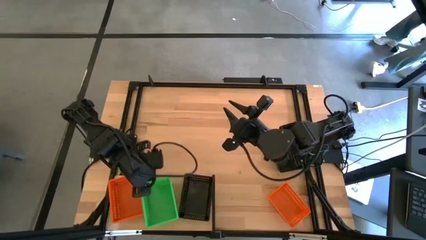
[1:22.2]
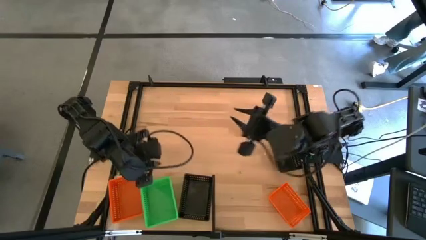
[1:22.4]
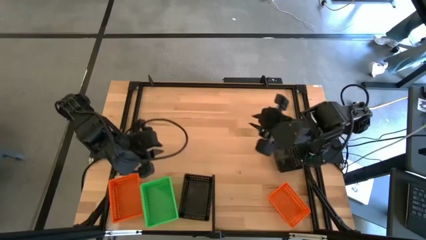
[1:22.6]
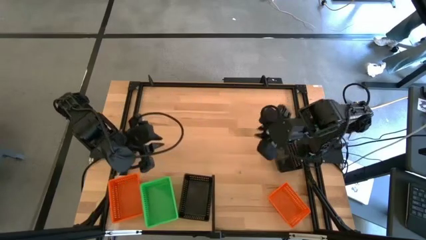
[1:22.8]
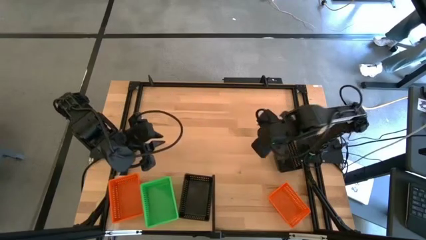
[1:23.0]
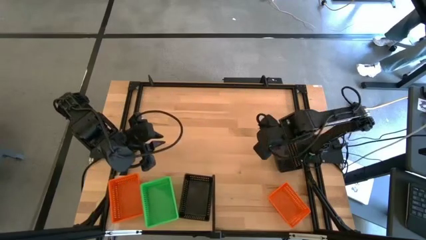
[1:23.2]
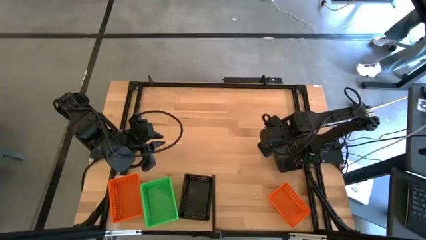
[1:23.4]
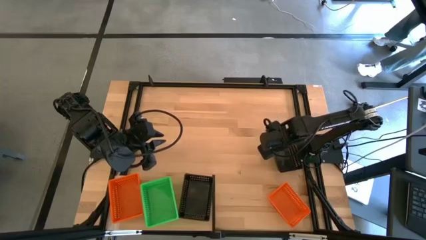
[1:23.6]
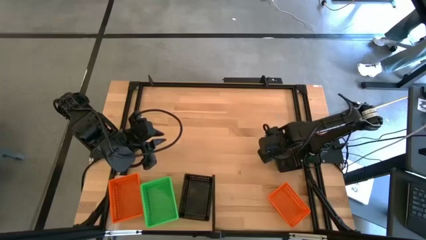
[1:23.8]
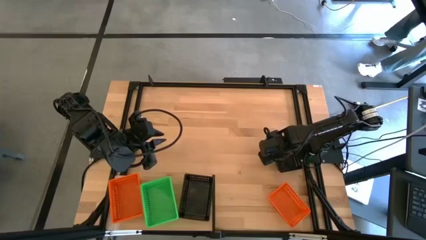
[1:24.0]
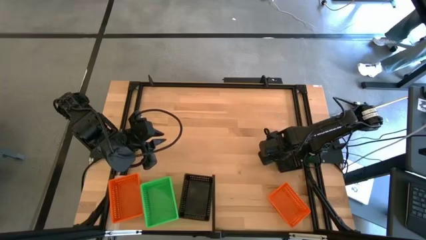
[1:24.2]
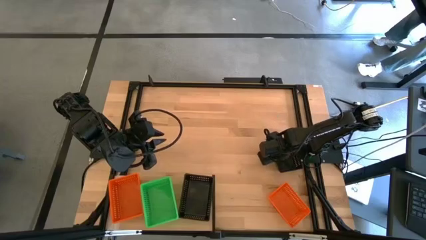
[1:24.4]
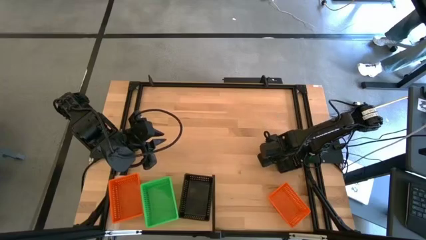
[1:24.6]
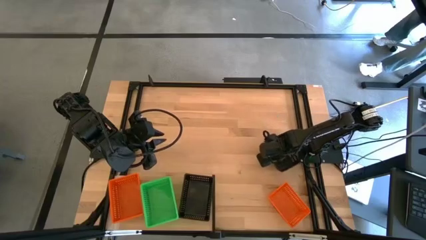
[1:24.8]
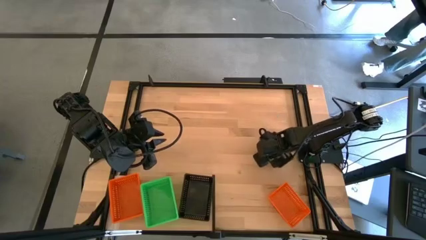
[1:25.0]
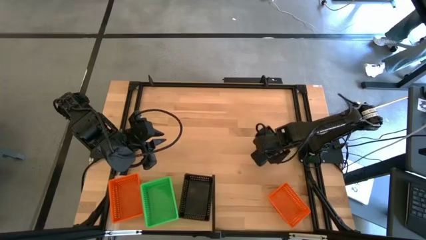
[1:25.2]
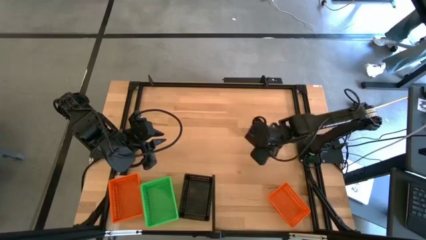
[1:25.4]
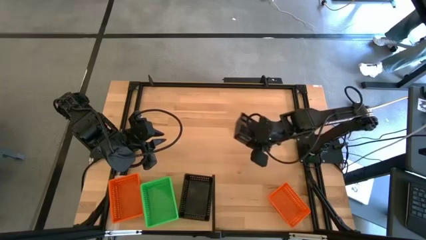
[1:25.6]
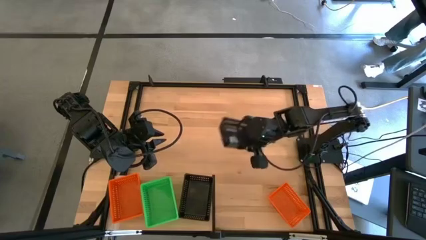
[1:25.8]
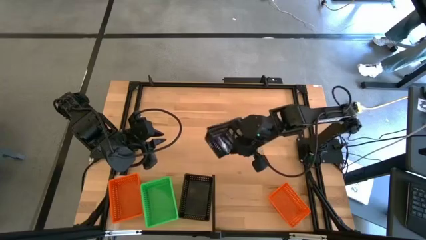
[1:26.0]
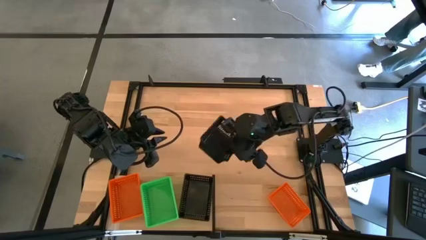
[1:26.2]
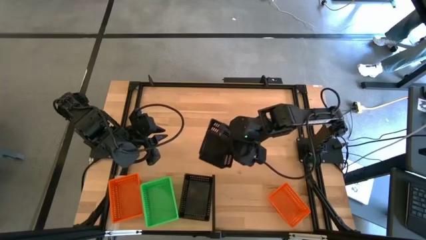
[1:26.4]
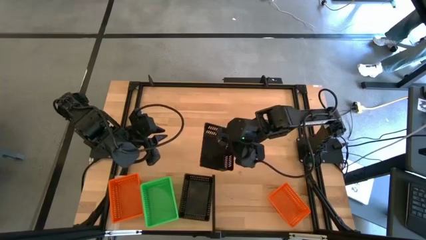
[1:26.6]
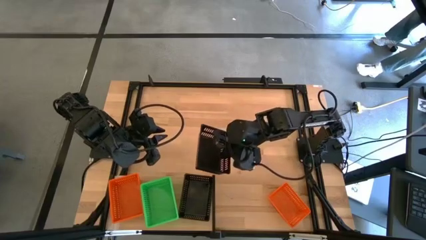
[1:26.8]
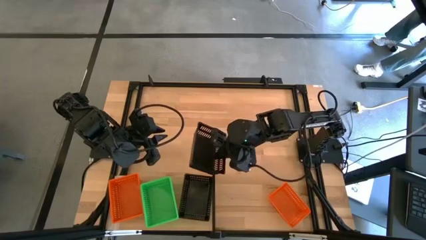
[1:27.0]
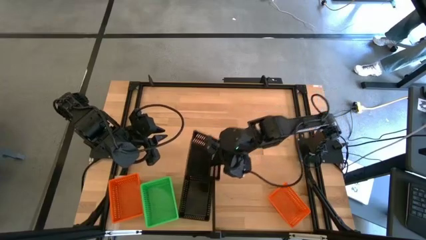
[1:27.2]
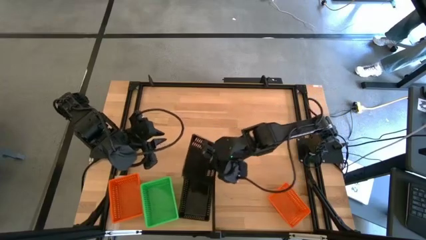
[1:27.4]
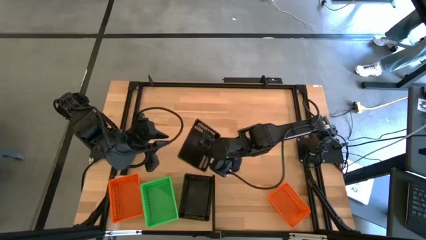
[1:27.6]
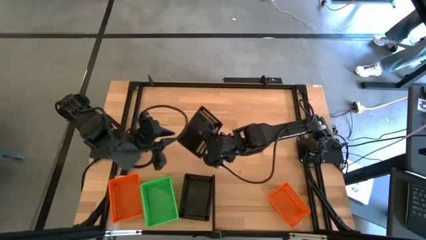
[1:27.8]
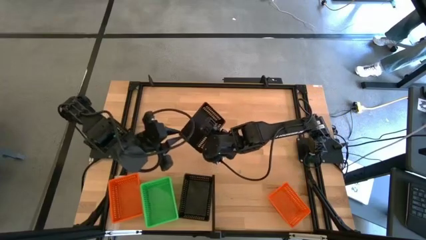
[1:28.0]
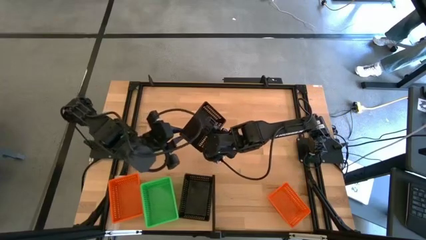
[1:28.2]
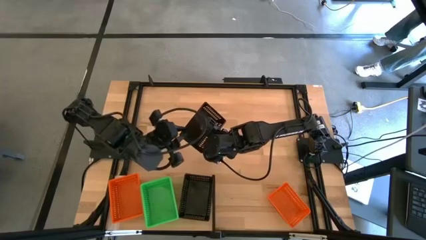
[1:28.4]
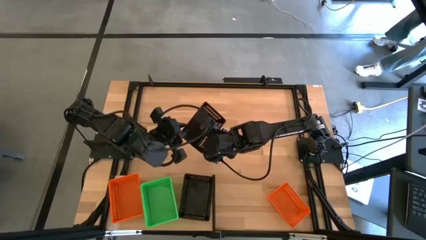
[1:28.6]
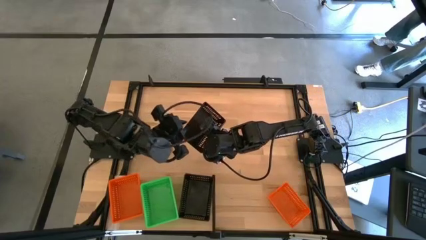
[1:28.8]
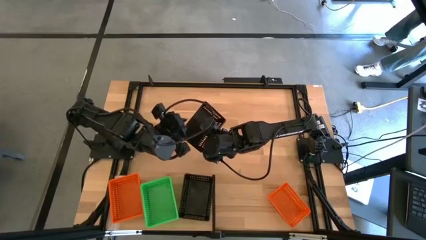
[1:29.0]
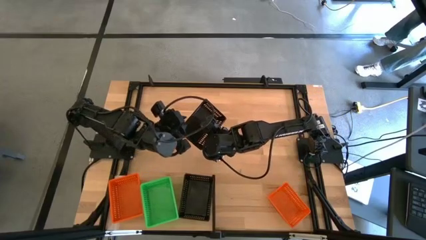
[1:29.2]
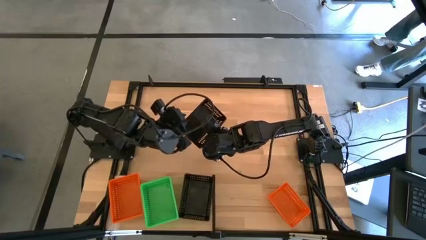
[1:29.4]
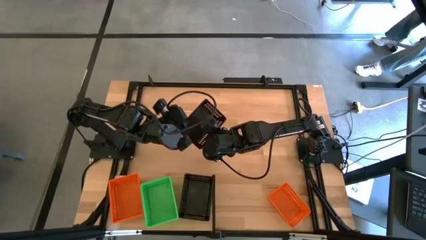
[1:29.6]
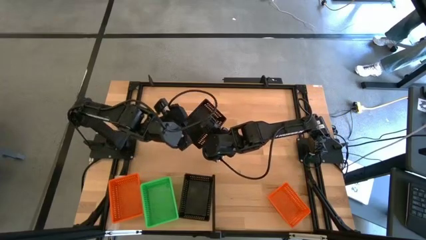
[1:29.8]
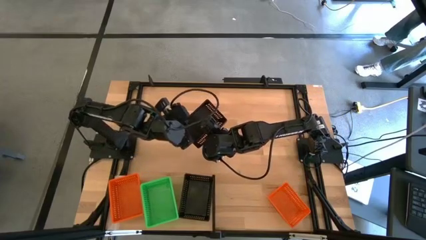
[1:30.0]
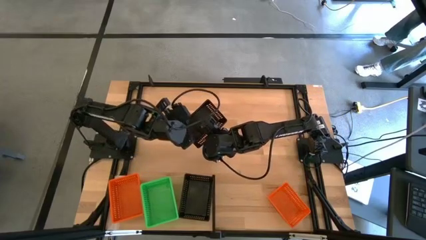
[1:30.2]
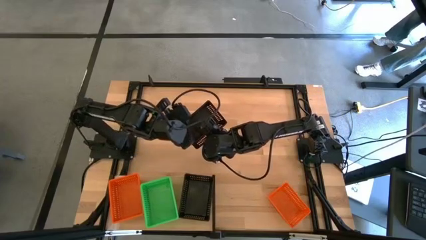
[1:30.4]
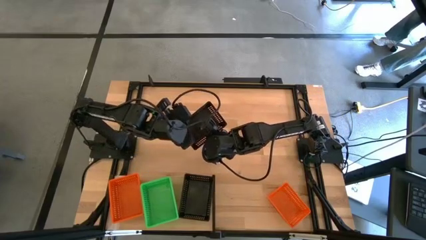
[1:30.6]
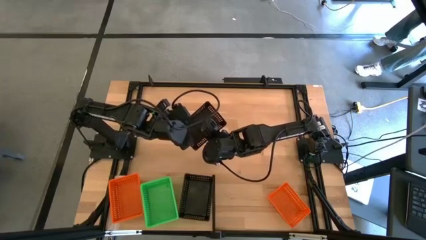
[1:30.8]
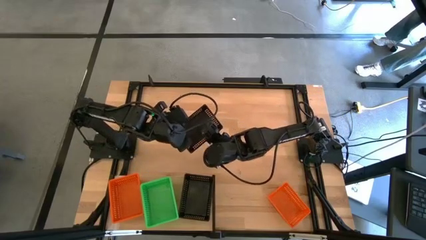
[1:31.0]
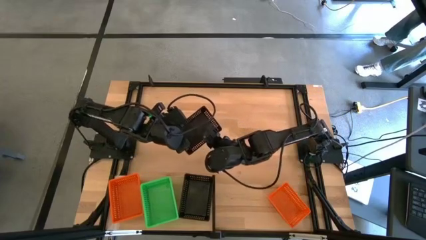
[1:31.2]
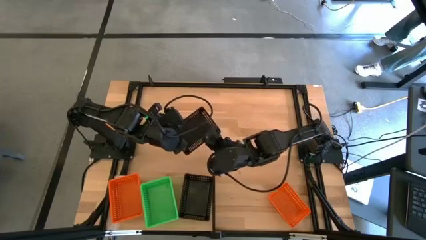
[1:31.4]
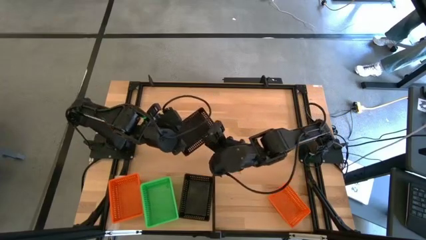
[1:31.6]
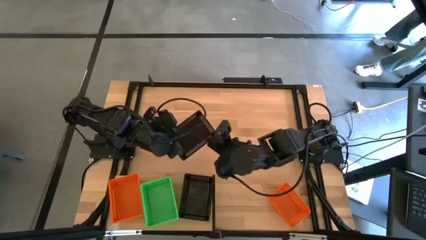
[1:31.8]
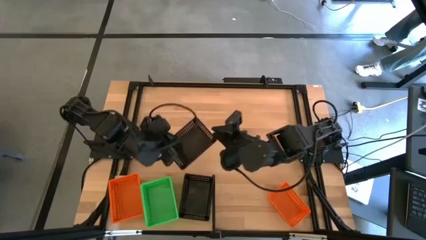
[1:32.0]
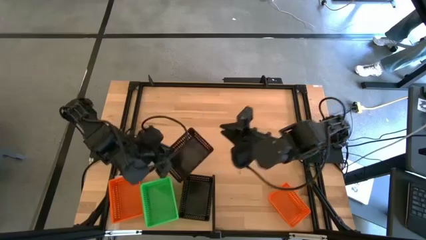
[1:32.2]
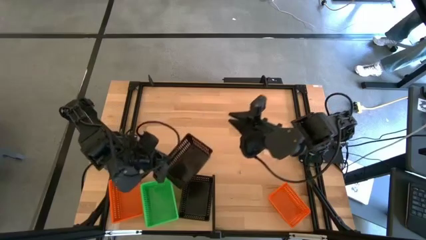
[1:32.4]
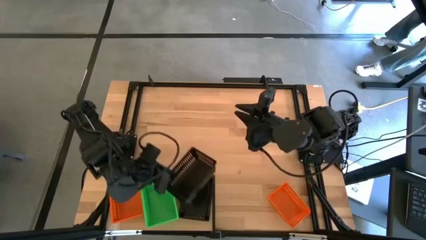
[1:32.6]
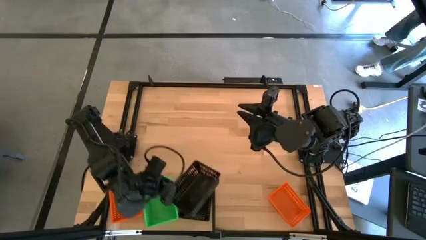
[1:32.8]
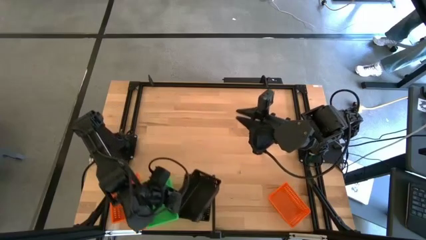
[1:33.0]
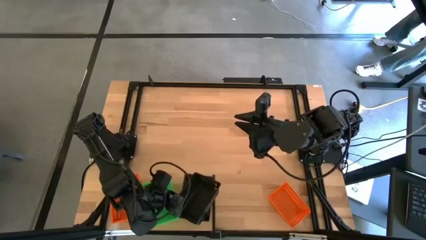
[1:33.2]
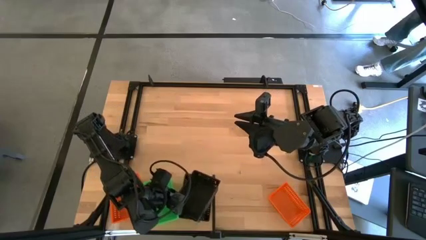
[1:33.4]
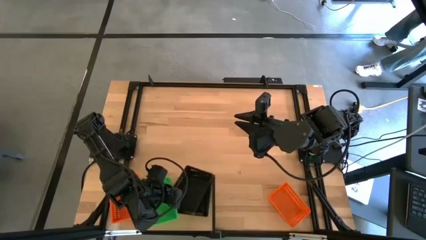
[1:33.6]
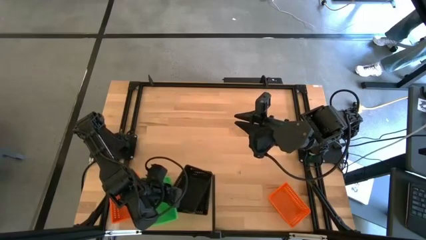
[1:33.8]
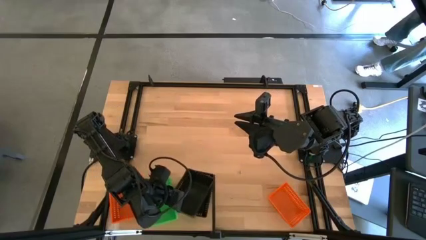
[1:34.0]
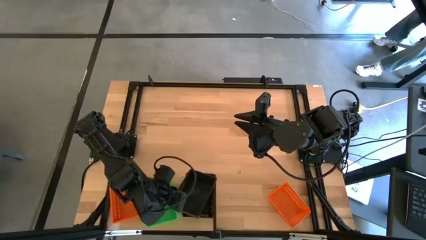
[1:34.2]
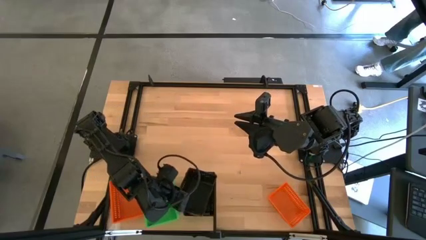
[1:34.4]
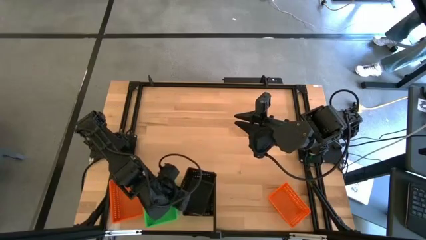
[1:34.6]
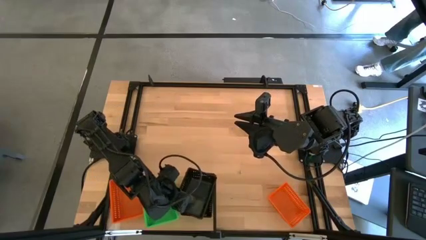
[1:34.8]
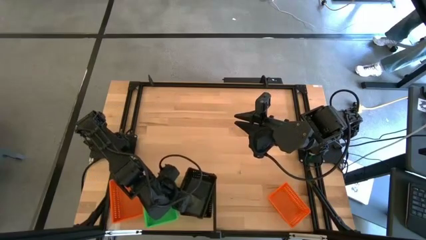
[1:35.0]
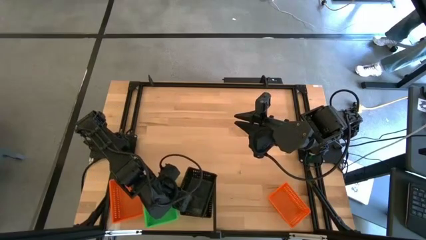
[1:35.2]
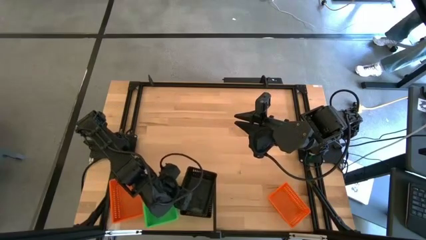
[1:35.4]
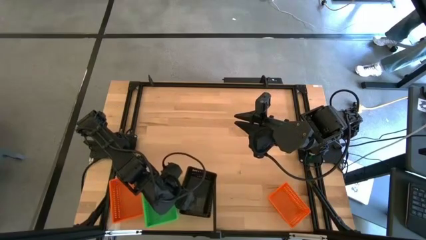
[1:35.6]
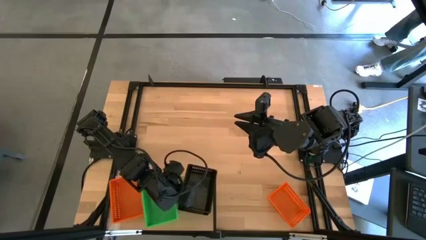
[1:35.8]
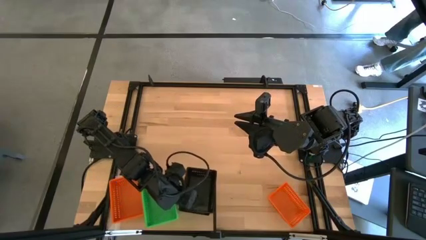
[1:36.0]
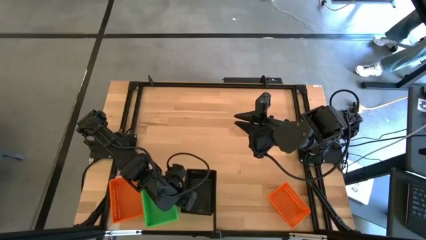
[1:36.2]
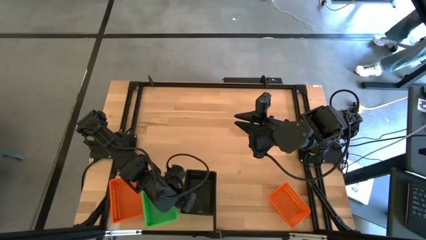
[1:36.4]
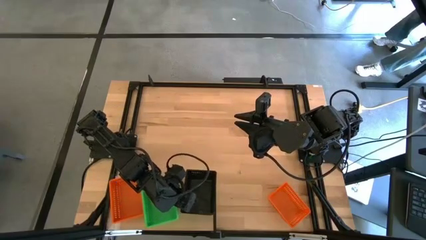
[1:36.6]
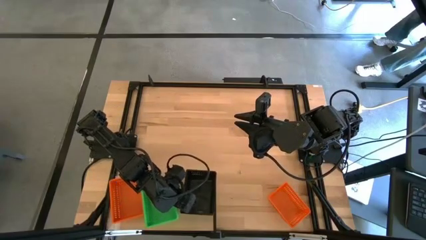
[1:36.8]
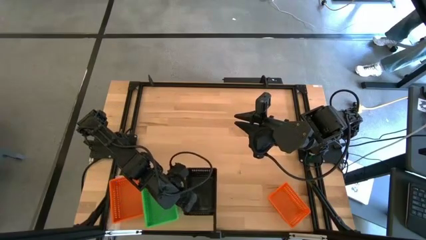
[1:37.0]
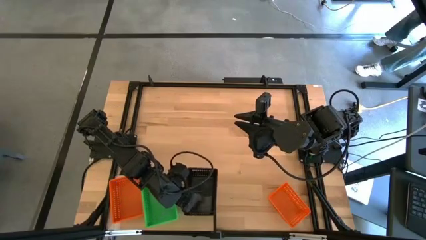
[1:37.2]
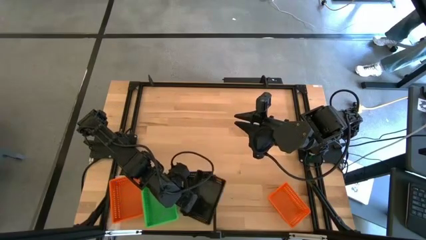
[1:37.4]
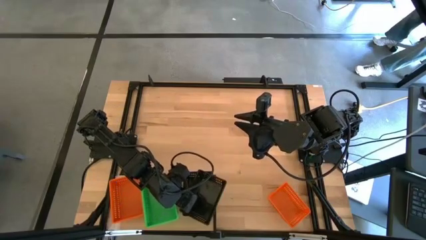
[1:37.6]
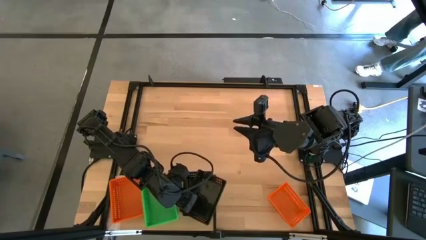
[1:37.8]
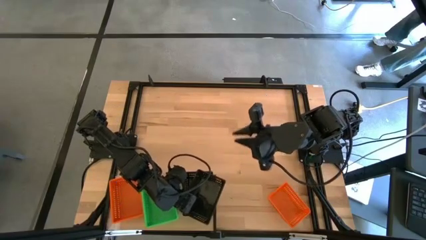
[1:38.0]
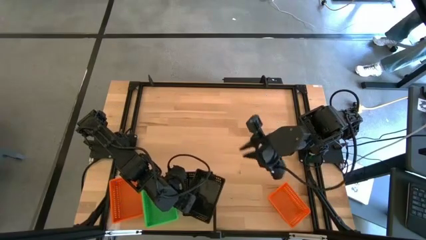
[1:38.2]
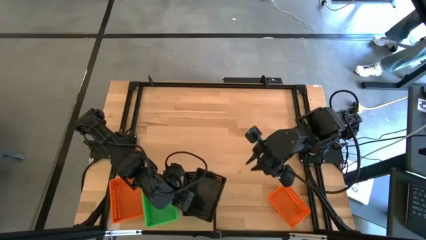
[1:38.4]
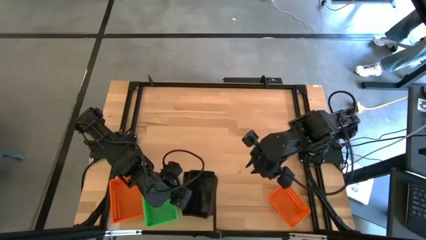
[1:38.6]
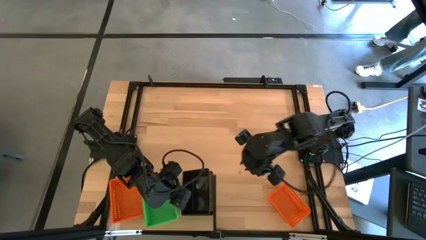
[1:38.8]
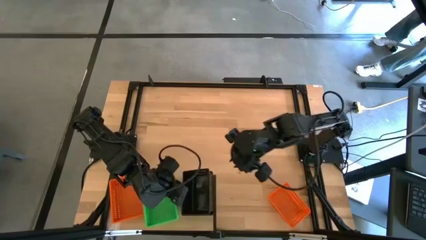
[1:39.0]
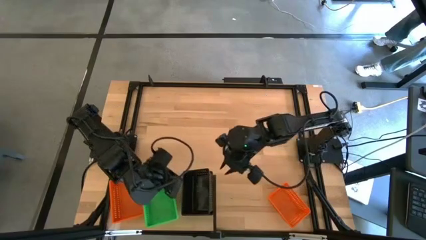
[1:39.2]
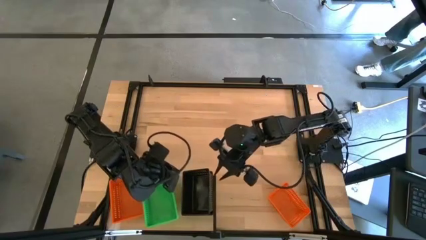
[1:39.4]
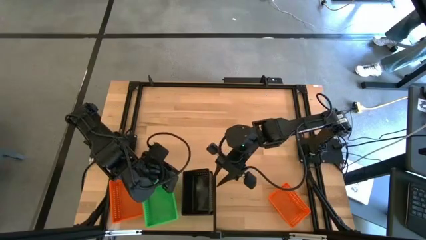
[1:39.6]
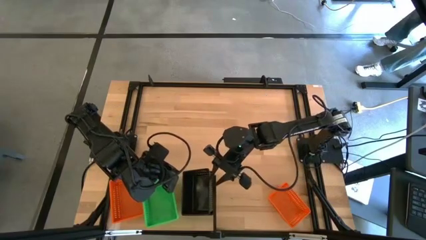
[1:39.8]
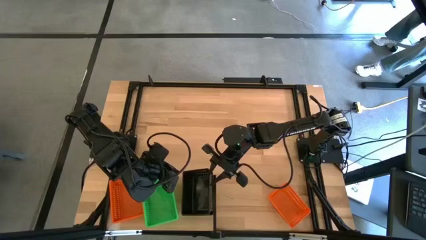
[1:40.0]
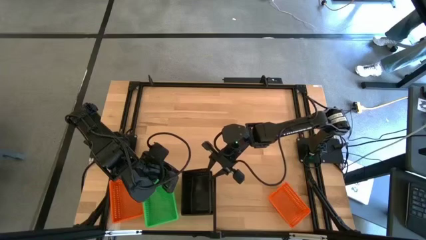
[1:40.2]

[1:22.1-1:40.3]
Task: Stack baskets on shelf by color
Stack the black basket on top of the other black baskets on the shelf
